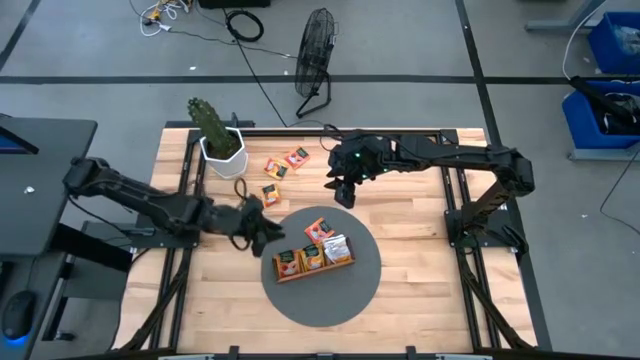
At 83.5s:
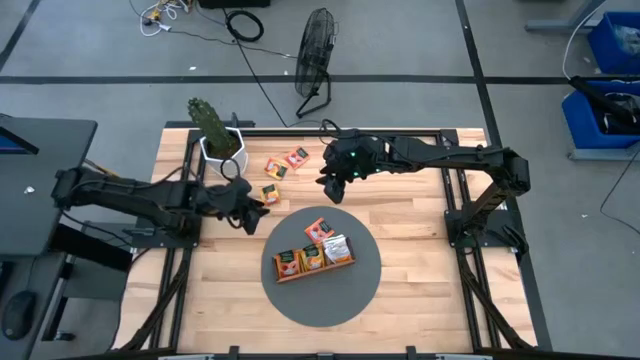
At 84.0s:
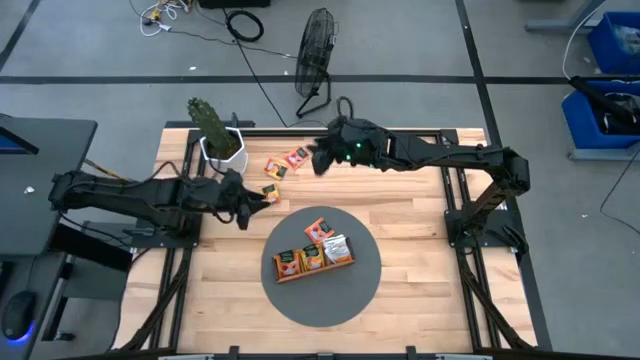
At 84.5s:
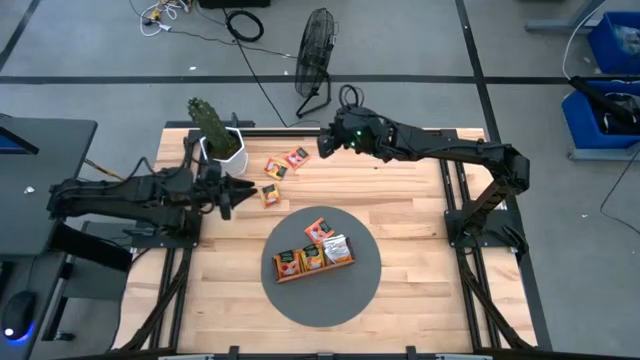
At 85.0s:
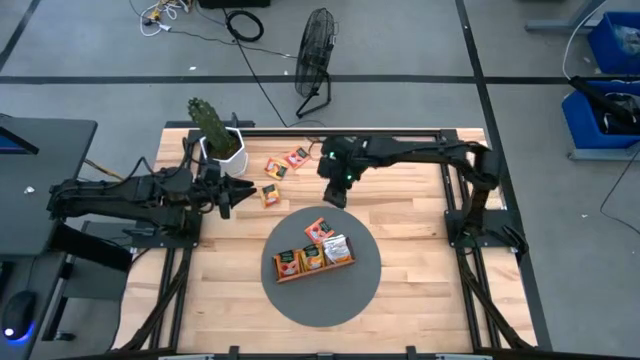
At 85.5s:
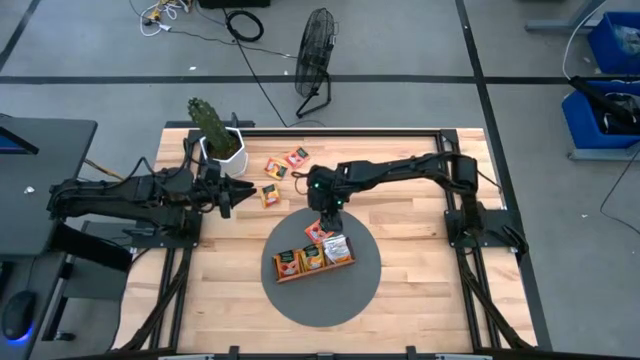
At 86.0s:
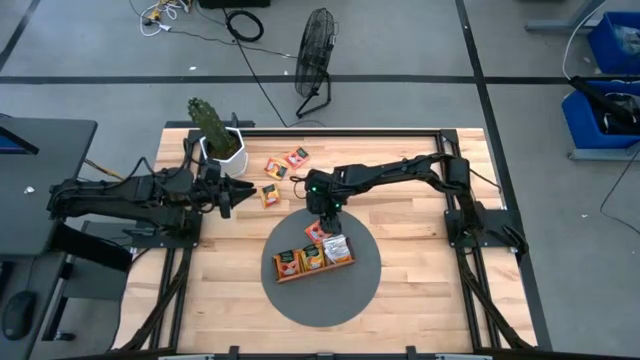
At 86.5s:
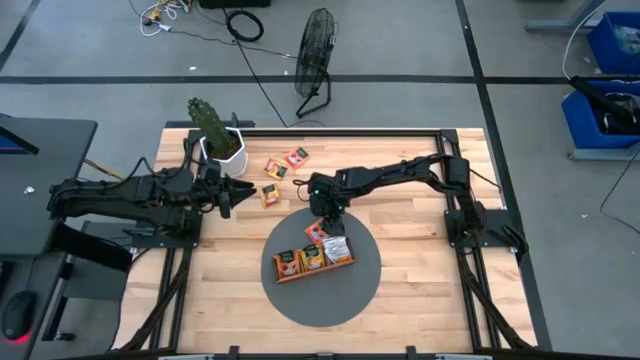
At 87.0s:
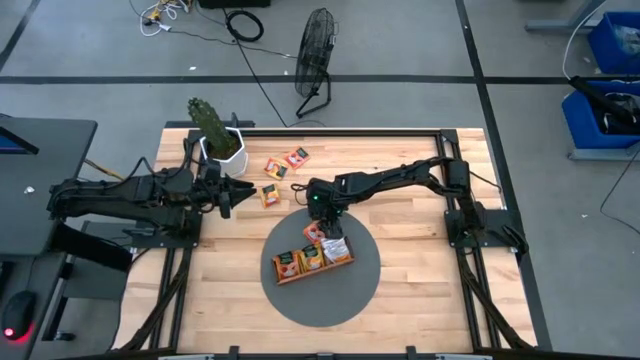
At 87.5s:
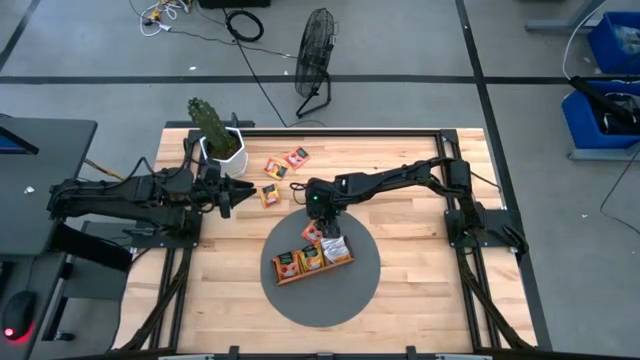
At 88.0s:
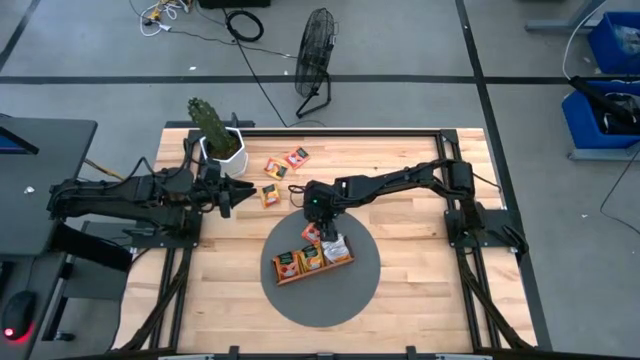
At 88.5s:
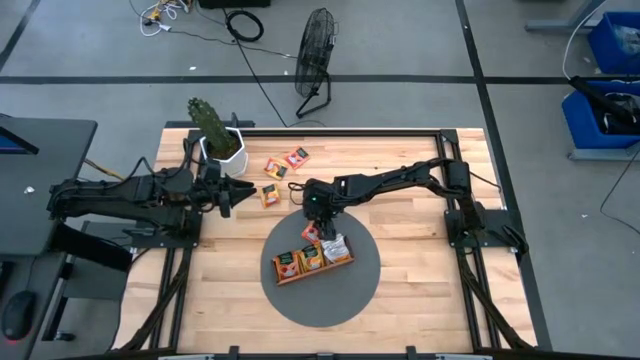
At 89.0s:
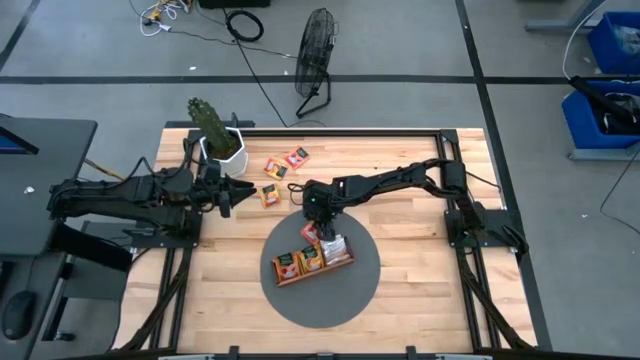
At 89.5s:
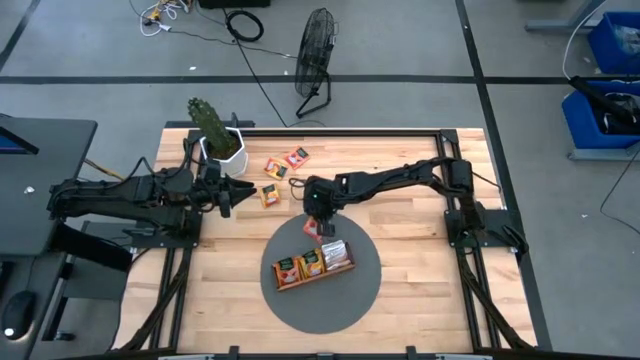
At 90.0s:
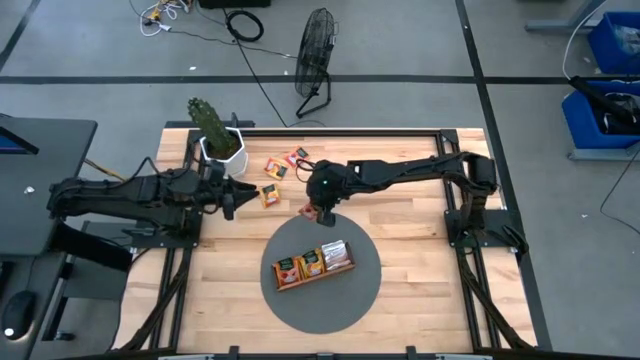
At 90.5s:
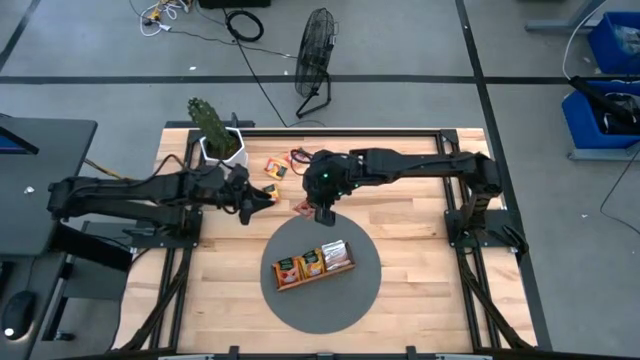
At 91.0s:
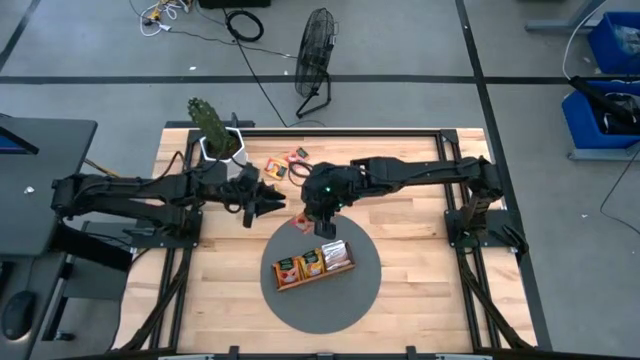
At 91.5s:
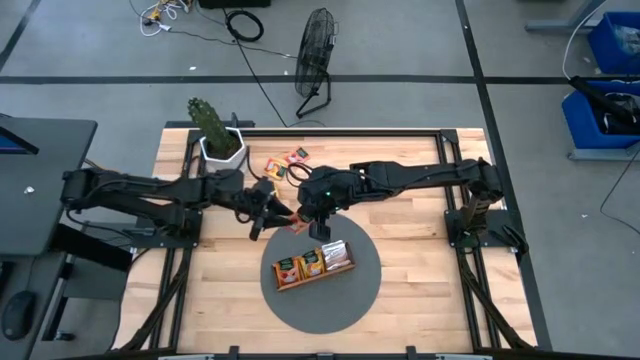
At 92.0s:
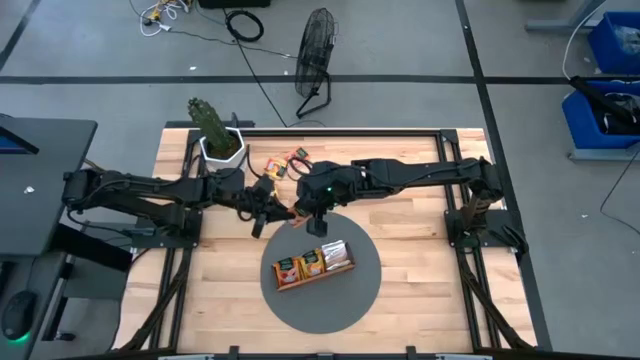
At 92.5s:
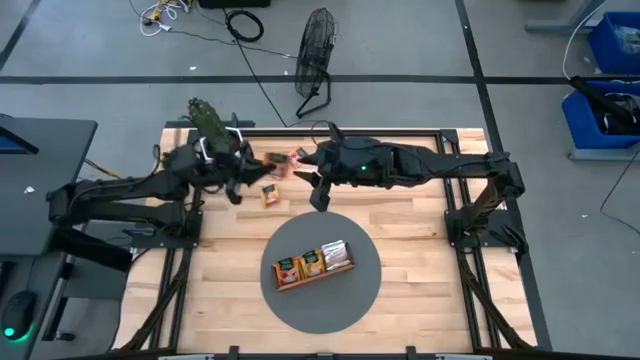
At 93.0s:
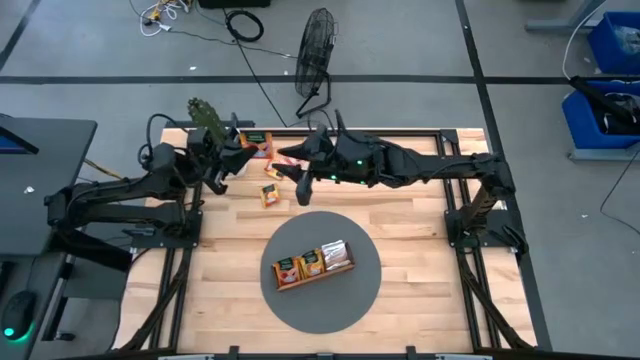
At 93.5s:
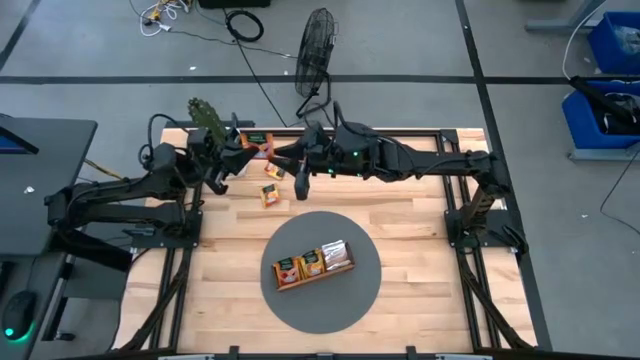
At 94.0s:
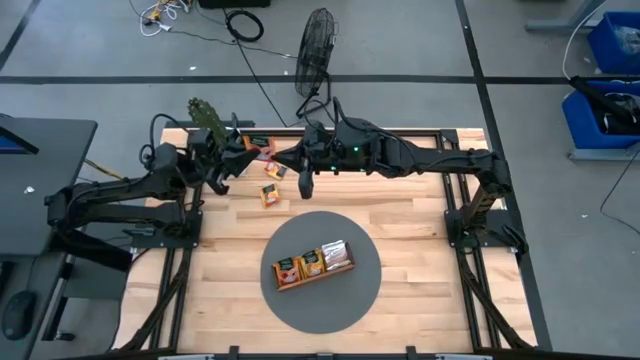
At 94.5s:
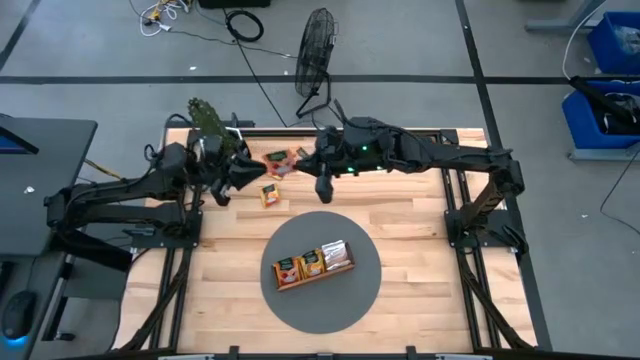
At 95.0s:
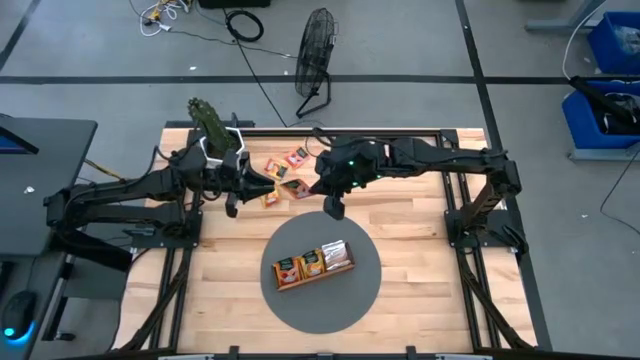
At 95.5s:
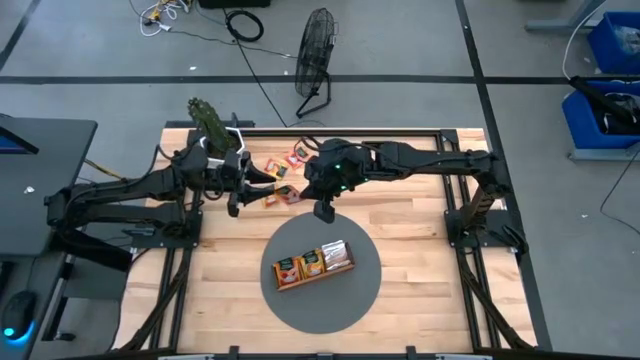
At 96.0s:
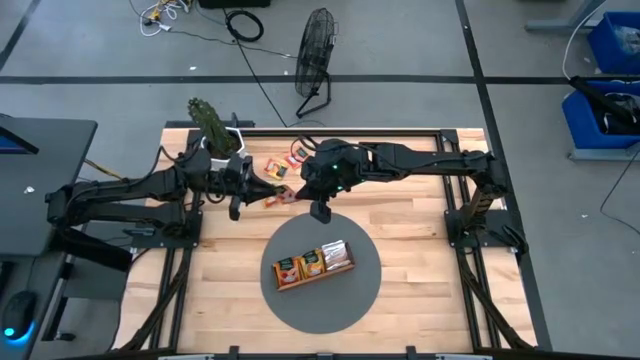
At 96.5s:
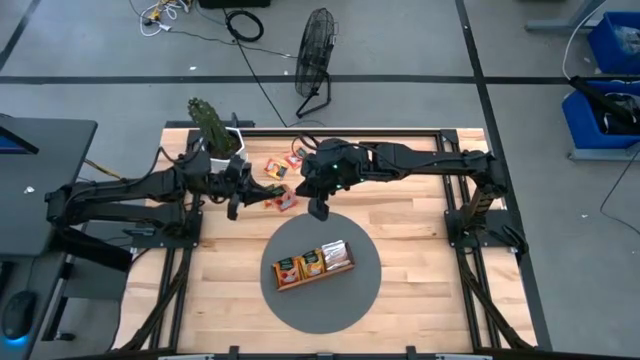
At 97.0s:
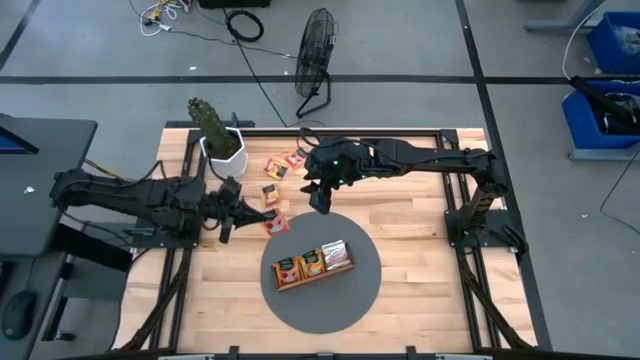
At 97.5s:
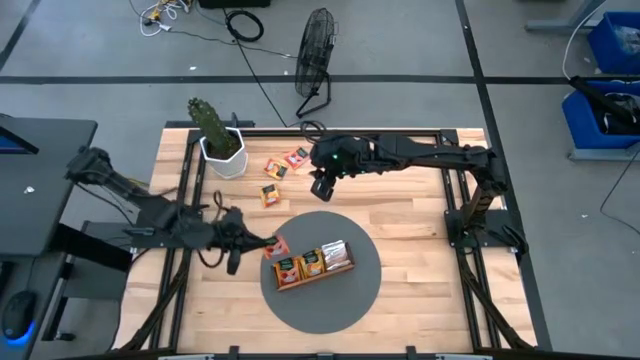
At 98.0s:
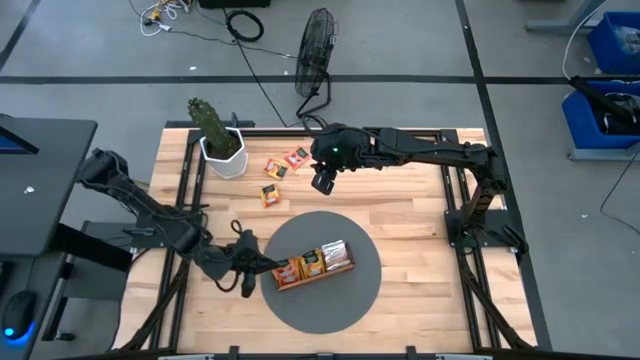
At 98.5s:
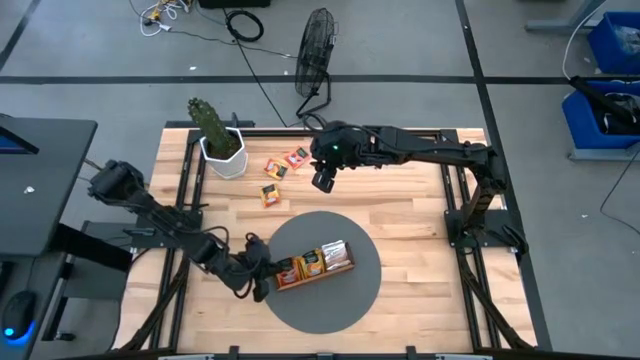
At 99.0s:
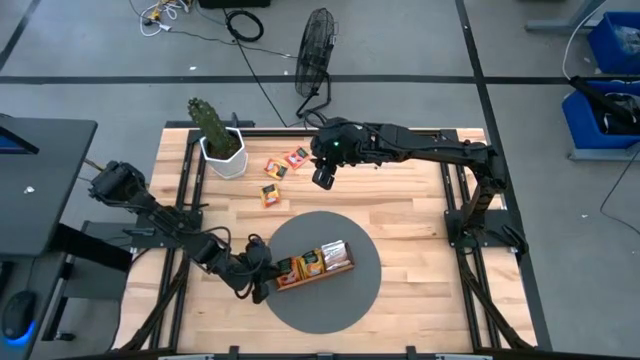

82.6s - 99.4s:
Task: Pick & Place Tea
Put the bottom orange tea bag into the left section of the wooden organizer

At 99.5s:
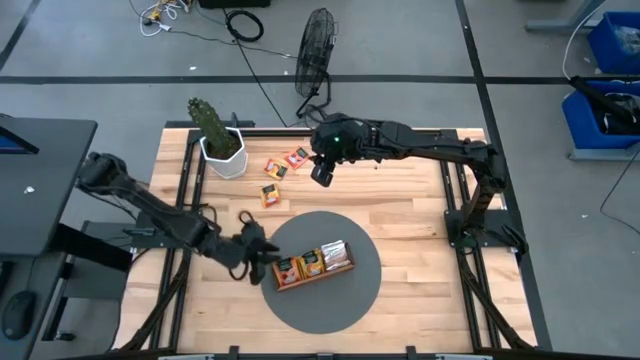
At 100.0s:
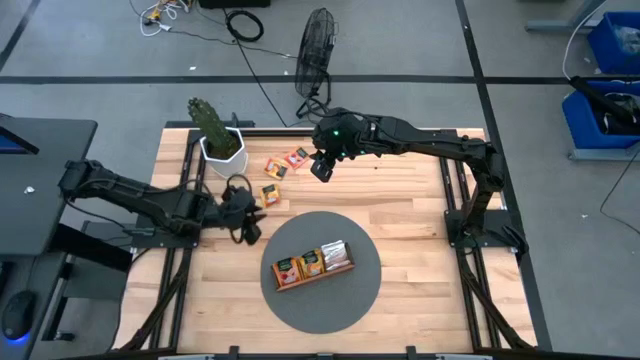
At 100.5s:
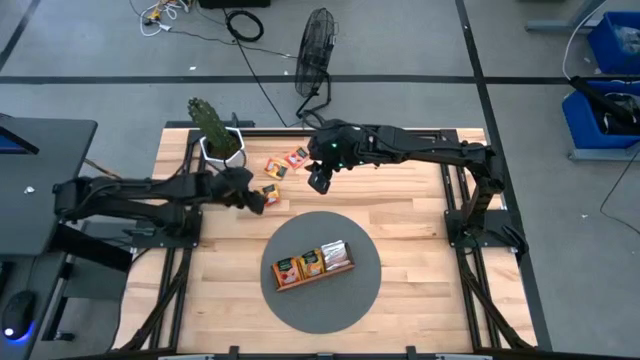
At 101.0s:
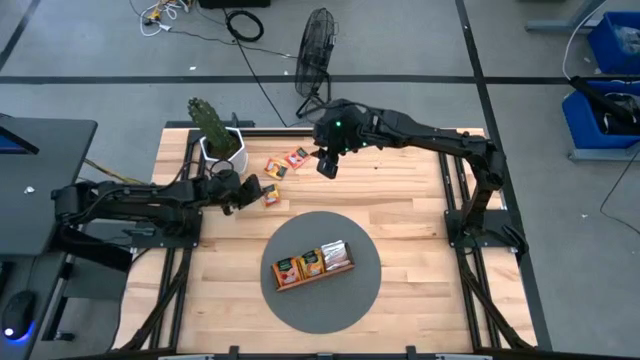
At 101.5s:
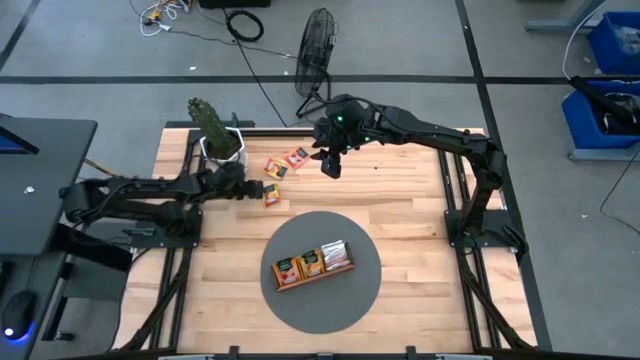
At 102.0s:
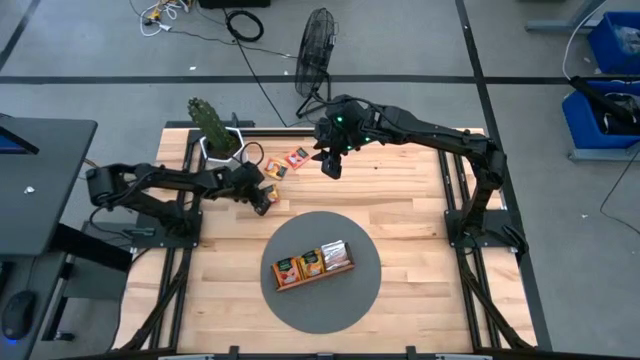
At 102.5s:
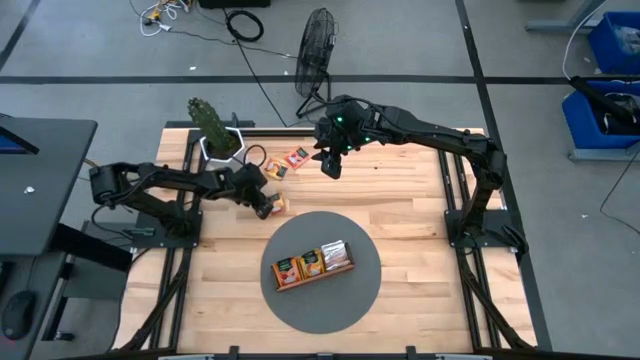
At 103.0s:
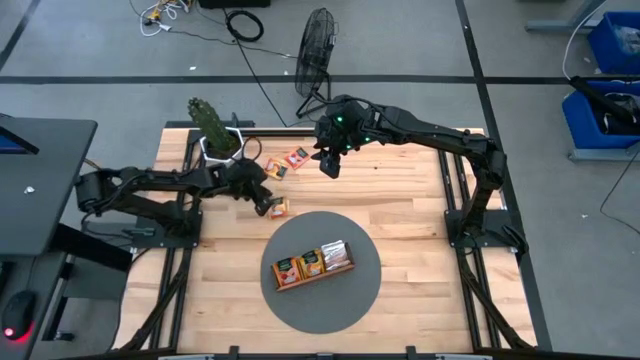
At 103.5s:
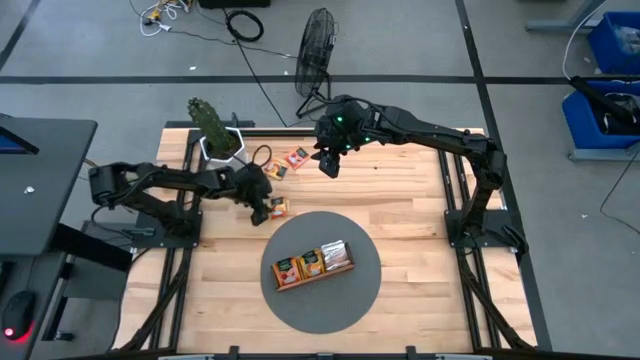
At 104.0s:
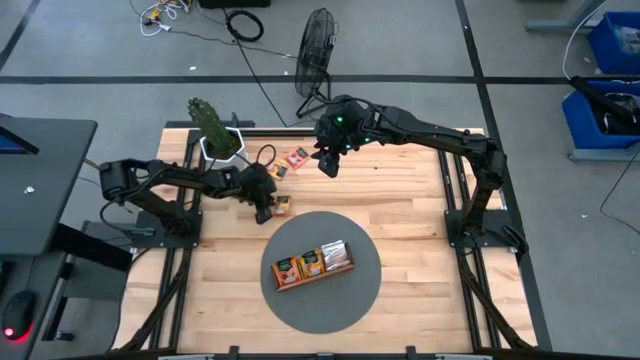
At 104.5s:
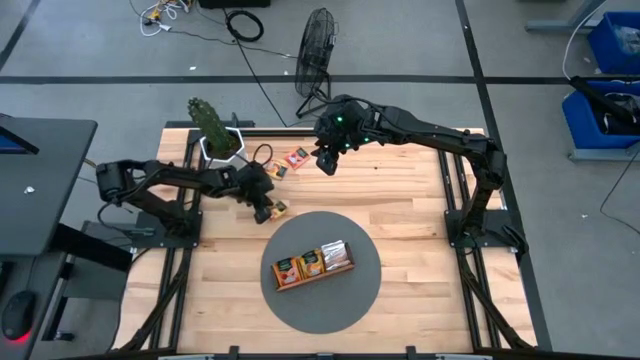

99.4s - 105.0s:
Put the bottom yellow tea bag into the middle section of the wooden organizer
